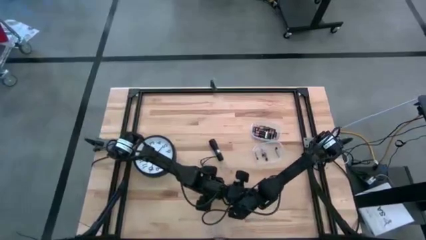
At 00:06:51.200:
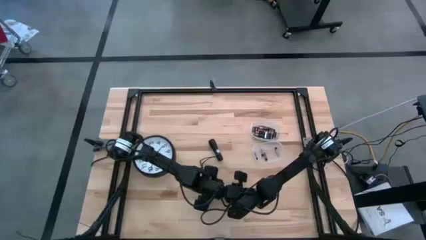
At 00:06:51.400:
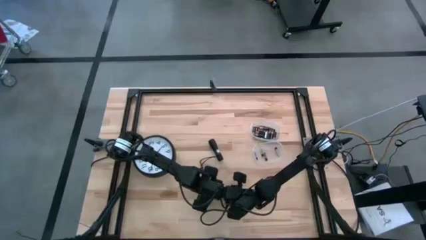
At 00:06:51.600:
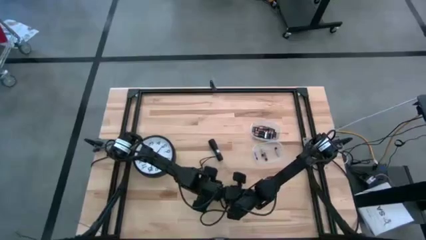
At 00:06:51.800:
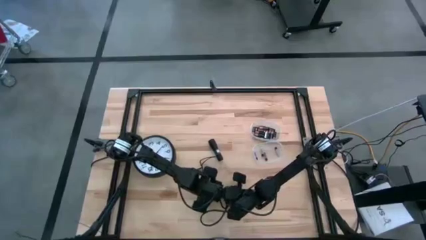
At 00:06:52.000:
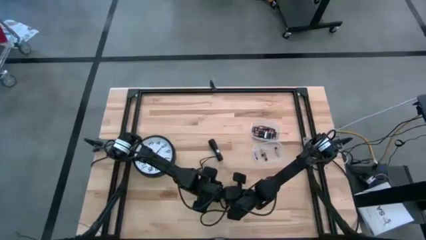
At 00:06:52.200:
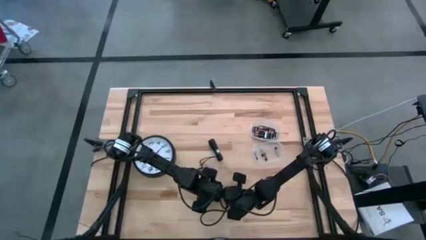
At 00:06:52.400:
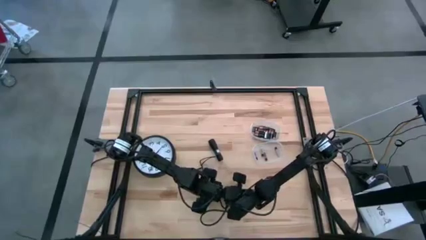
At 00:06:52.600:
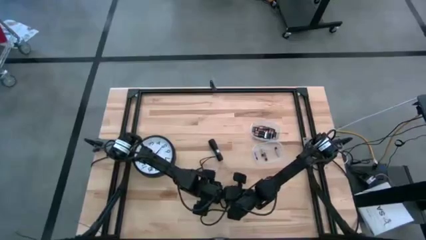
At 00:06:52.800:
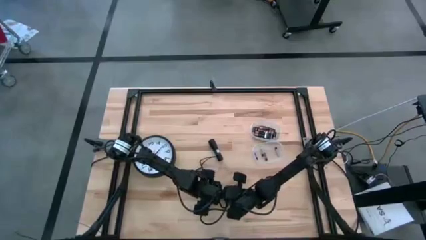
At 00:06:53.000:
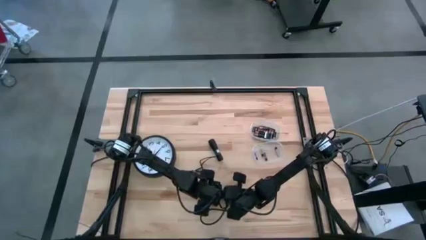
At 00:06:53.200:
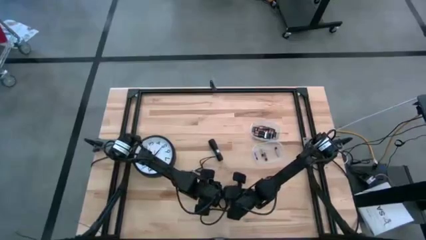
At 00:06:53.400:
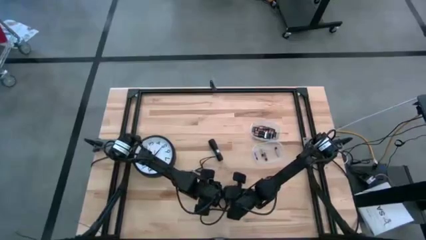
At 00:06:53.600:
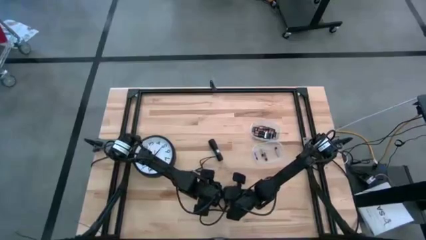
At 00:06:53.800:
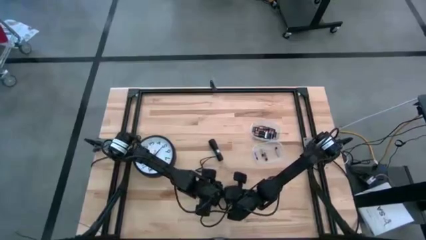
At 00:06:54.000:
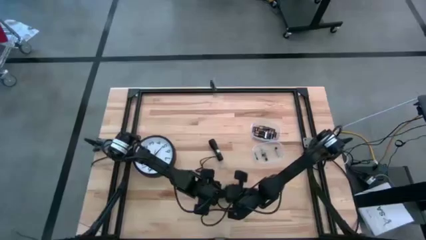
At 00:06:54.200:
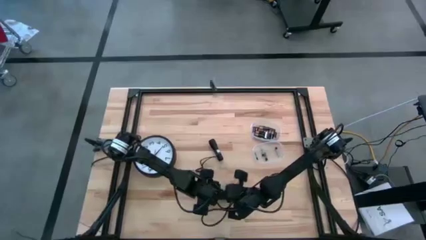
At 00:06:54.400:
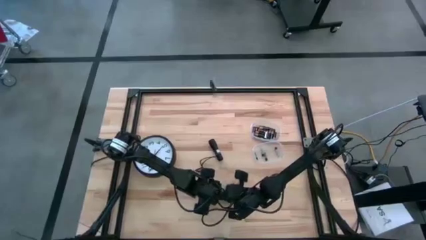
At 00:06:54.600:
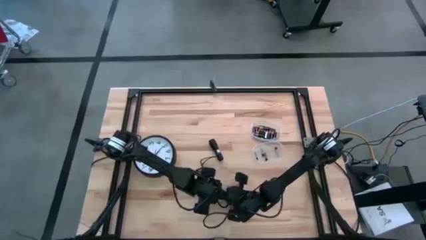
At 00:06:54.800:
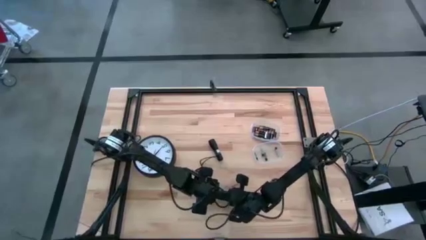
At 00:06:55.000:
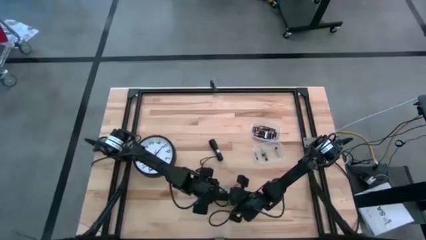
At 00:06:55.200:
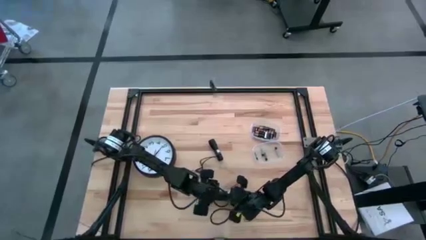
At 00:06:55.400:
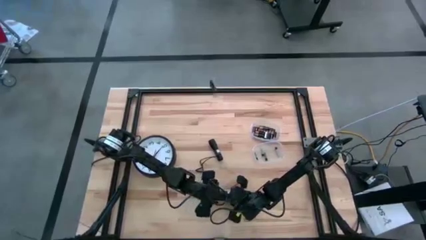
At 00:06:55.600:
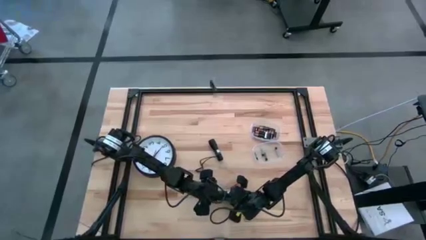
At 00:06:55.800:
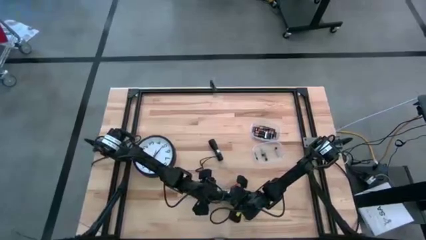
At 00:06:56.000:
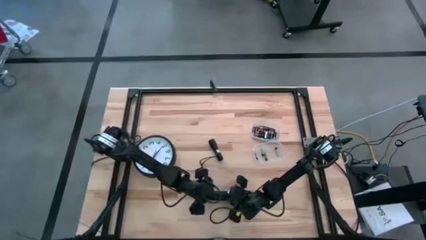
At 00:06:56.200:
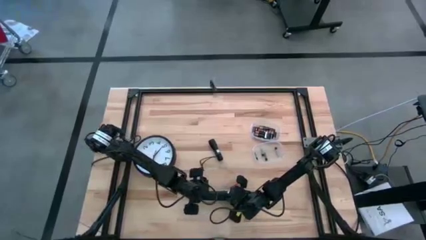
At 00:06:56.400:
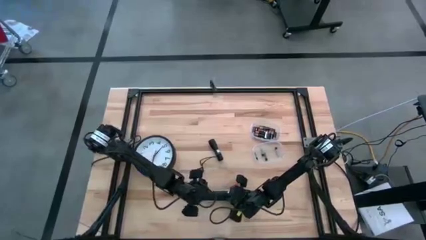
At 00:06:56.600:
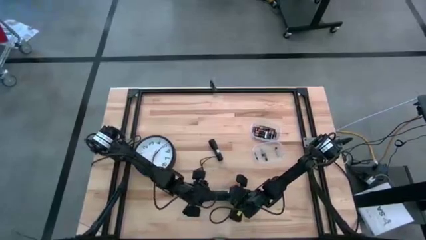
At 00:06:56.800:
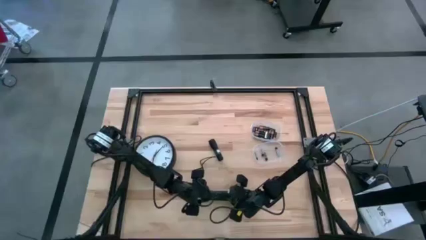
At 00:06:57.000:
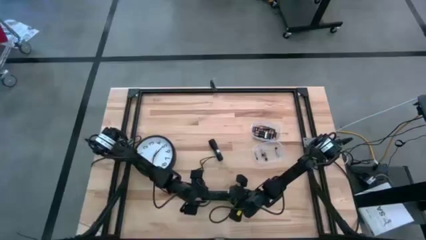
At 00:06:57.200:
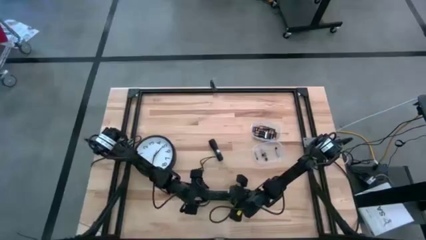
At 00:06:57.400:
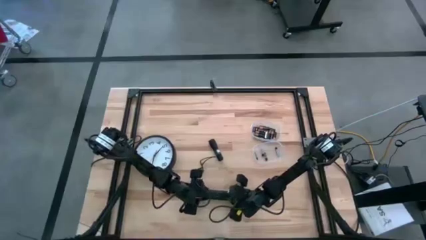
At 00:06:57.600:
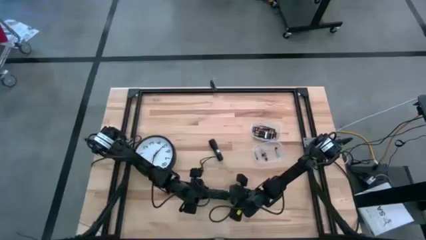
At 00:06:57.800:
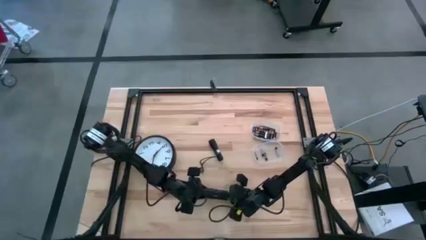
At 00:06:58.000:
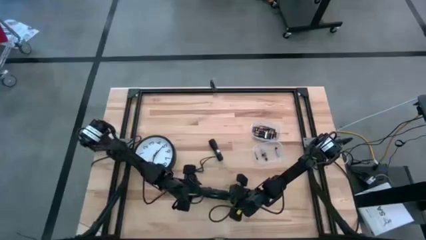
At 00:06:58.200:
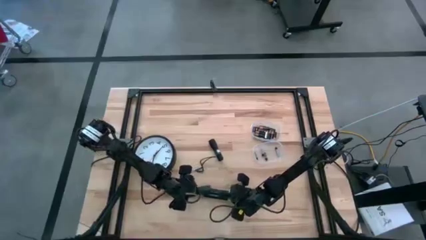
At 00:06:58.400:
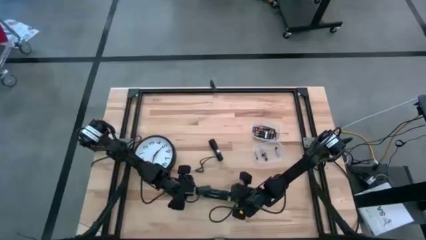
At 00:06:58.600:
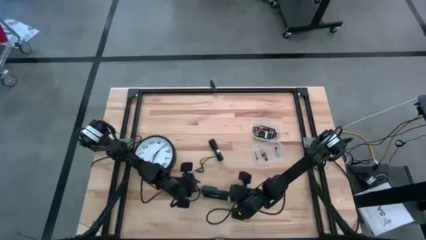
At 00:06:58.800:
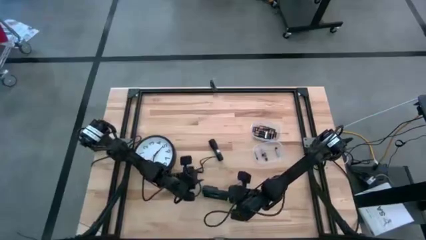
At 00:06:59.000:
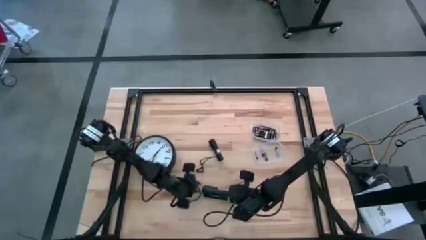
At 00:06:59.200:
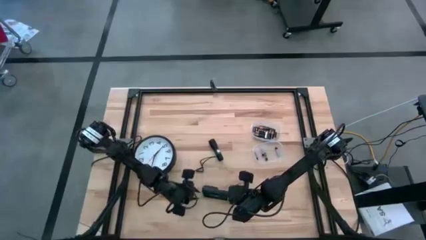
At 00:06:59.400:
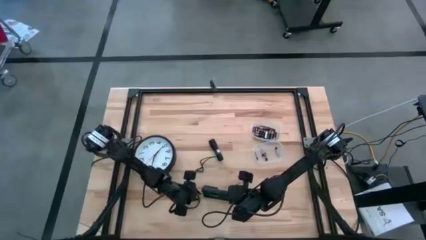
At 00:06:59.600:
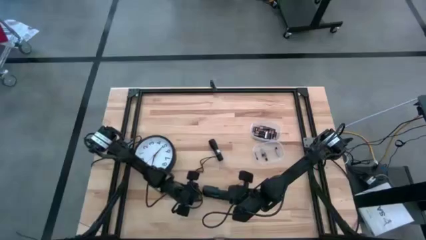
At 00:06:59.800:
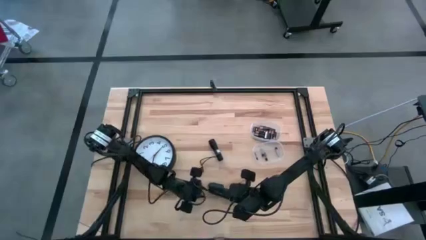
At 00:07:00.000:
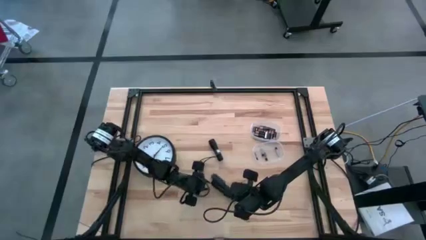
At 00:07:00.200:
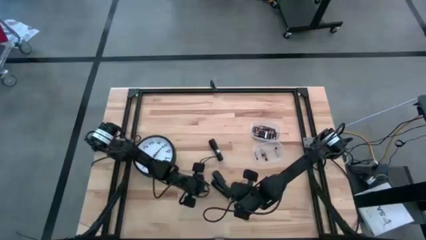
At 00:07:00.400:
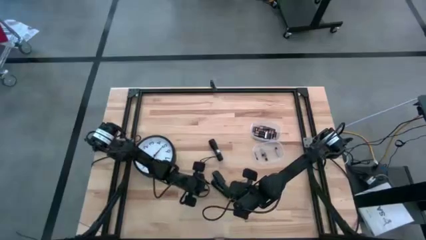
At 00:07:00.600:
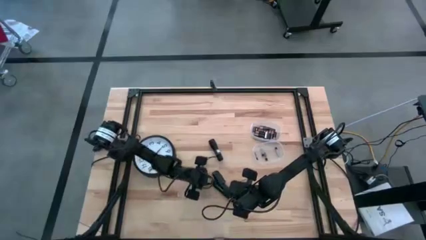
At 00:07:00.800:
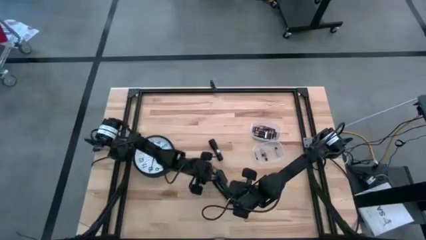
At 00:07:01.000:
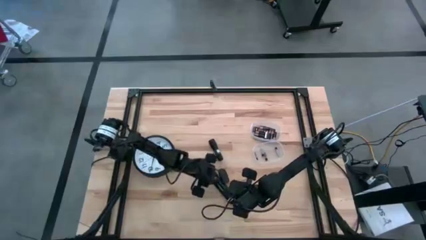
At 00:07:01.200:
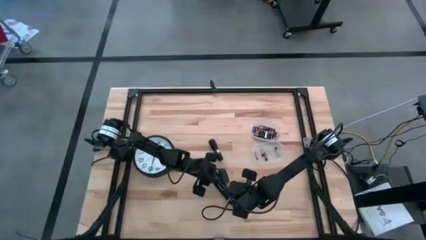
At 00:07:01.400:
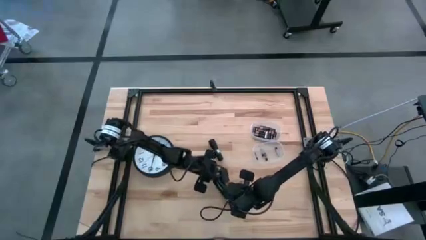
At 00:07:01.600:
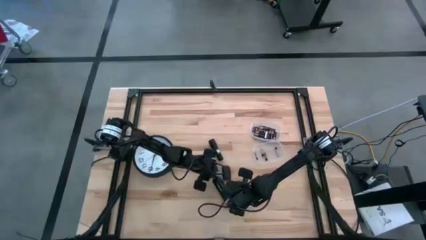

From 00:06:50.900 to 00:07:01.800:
Task: Insert battery
Remove the black cover of the remote’s battery compartment

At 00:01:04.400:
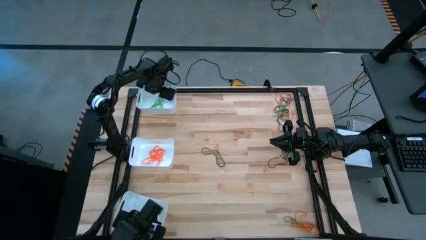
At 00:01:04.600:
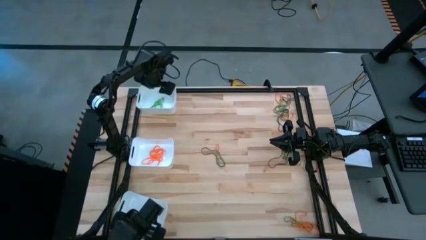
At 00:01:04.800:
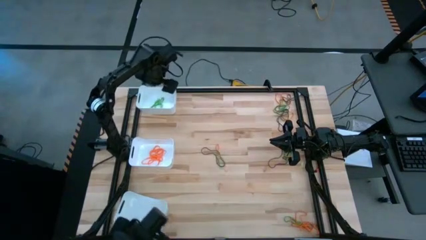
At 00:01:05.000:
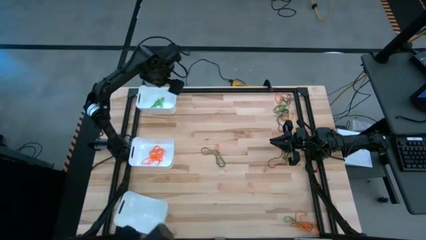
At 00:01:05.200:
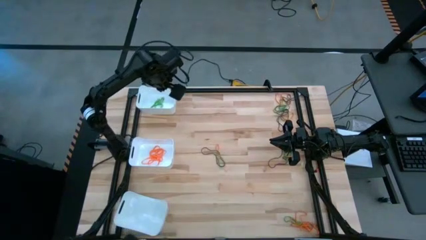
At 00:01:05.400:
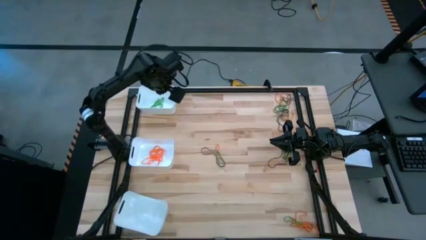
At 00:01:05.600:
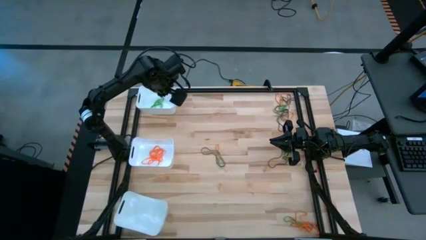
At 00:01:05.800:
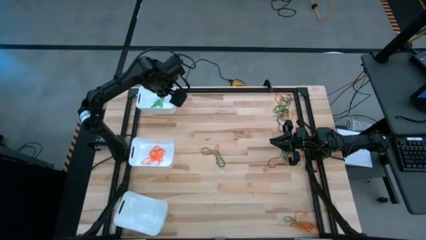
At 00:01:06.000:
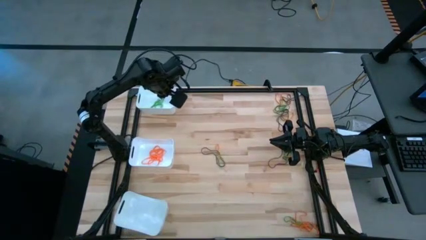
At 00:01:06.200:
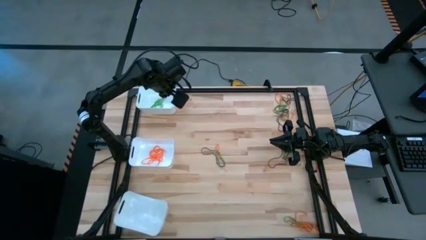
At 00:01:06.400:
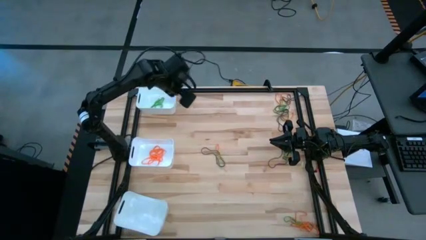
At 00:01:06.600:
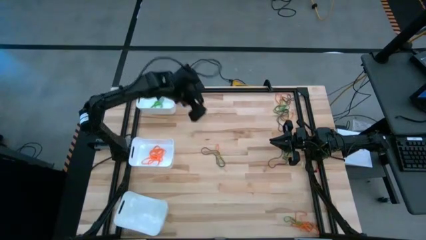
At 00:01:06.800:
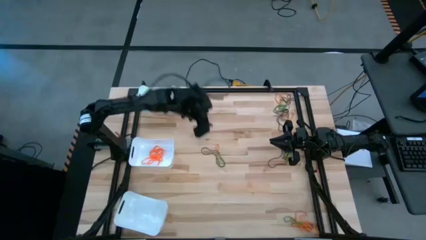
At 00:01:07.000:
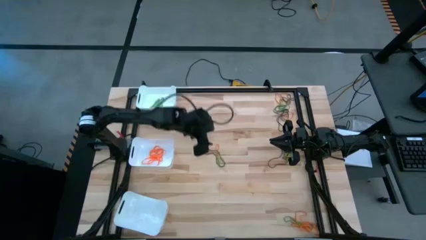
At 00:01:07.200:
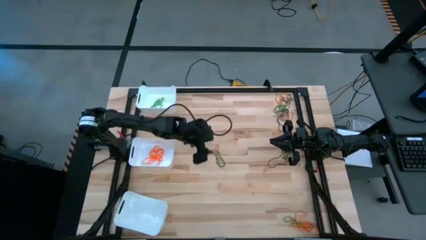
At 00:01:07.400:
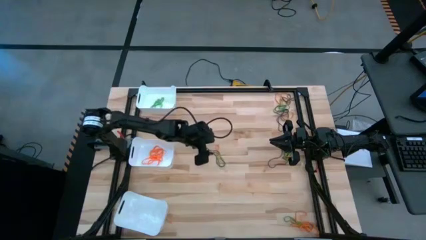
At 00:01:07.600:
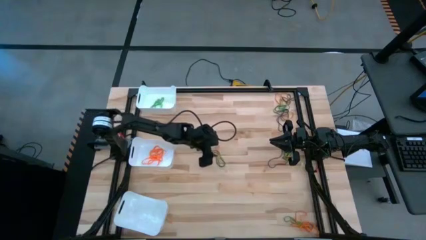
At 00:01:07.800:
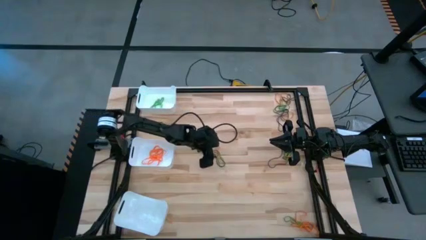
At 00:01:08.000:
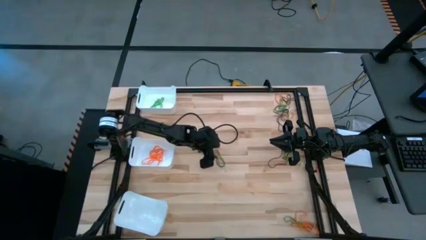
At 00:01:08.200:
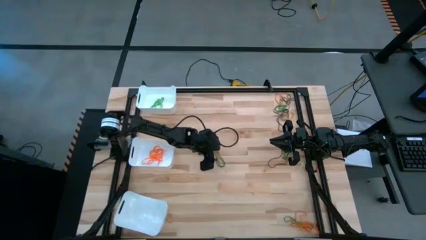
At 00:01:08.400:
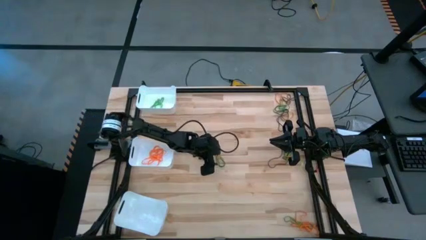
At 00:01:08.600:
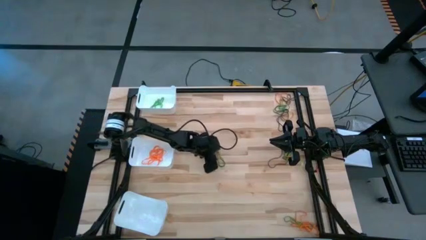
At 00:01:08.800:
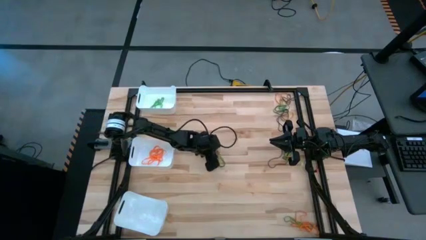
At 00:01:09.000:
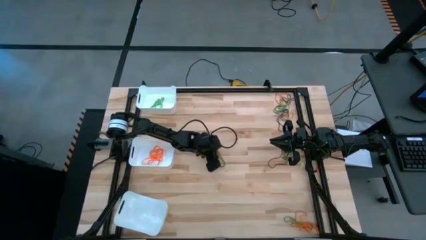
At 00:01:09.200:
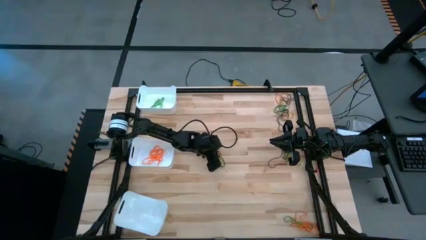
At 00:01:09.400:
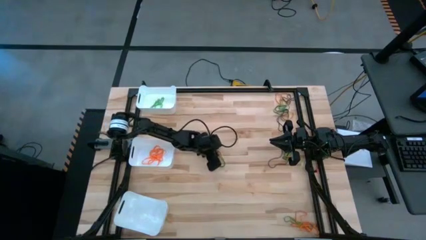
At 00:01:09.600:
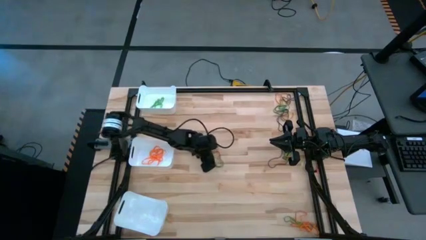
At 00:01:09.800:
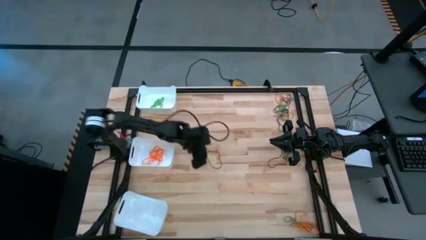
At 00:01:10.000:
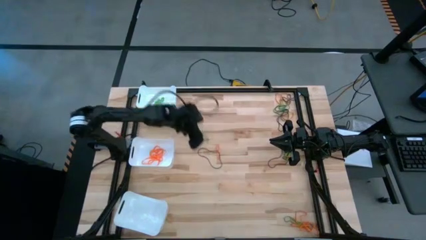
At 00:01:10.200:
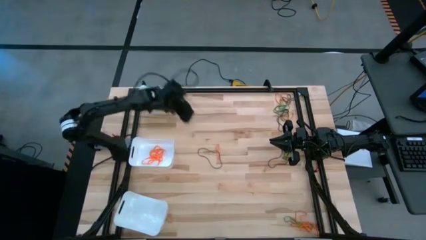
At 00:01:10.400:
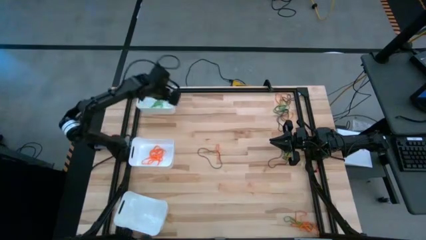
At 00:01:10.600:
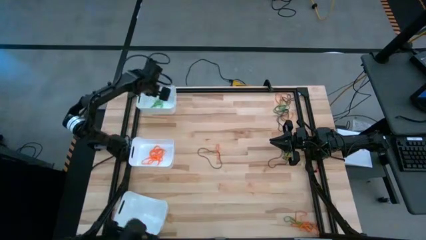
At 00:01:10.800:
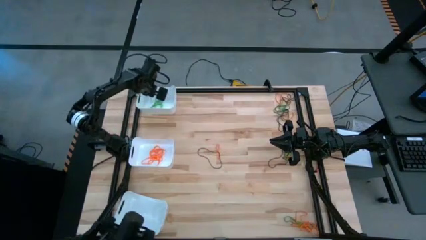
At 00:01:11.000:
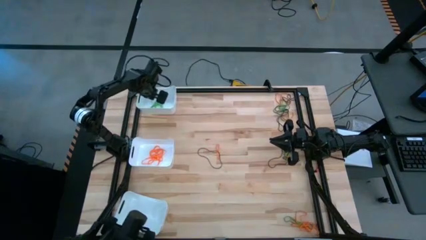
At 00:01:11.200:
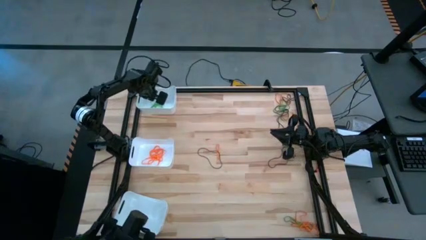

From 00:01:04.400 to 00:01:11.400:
Task: Sort rubber bands into baskets
Put the green rubber band into the top white bin
